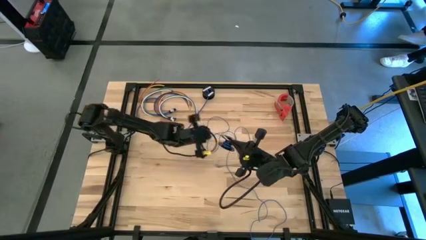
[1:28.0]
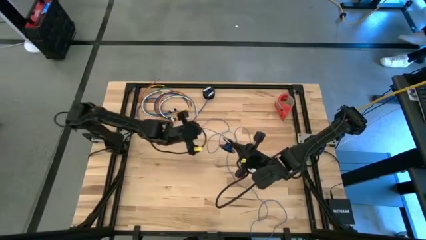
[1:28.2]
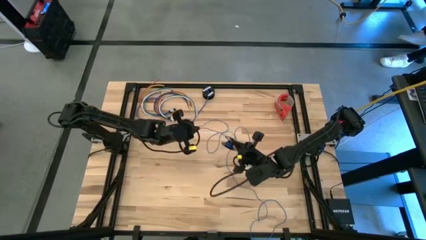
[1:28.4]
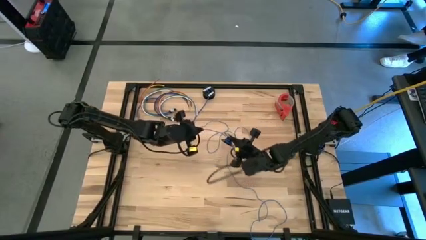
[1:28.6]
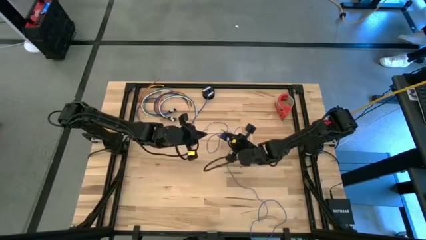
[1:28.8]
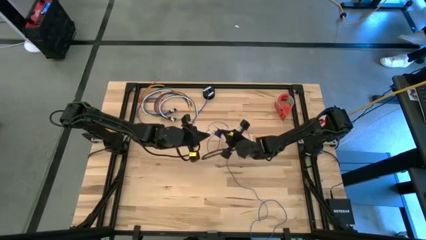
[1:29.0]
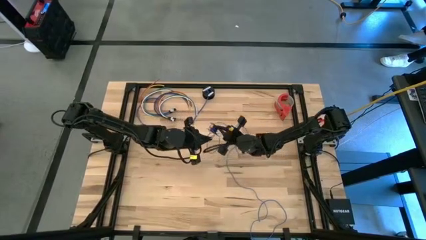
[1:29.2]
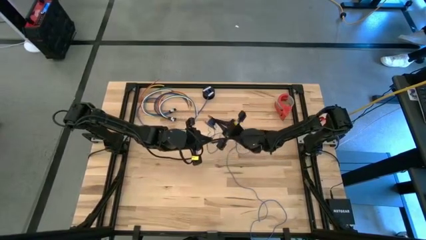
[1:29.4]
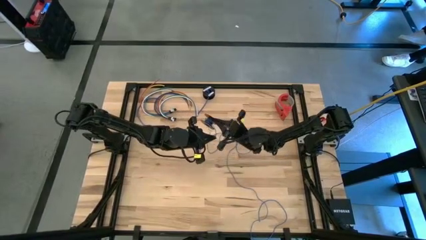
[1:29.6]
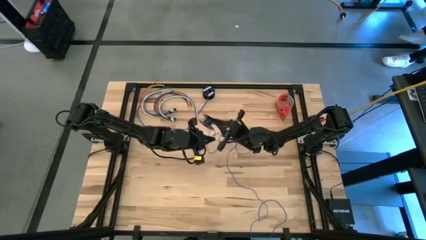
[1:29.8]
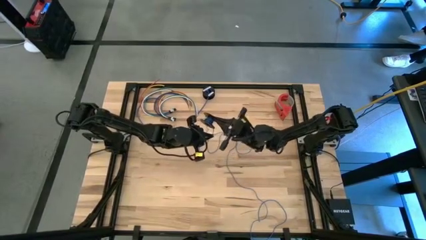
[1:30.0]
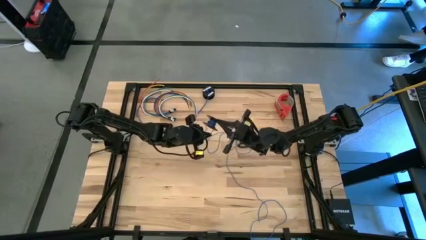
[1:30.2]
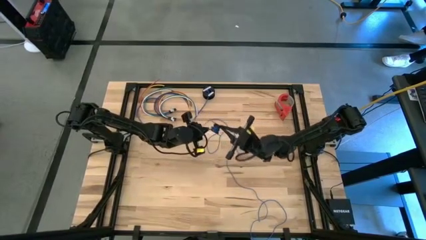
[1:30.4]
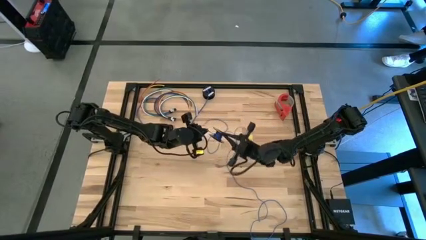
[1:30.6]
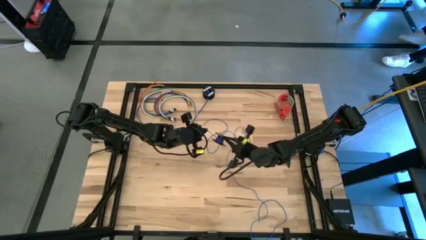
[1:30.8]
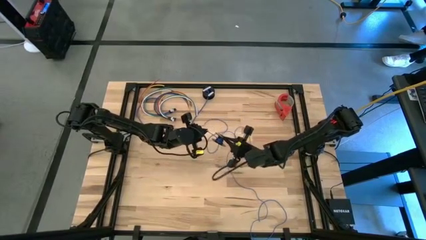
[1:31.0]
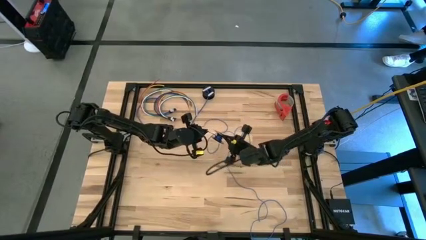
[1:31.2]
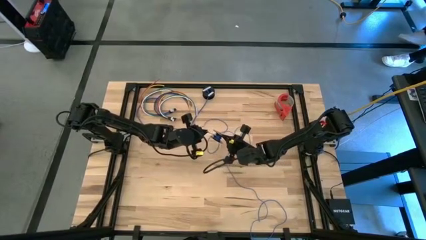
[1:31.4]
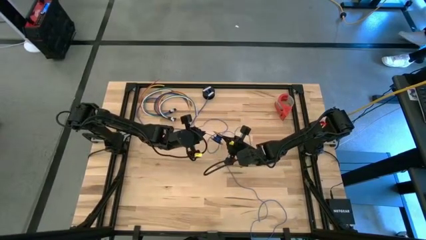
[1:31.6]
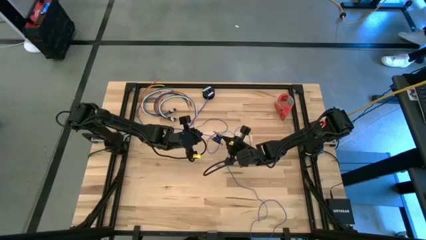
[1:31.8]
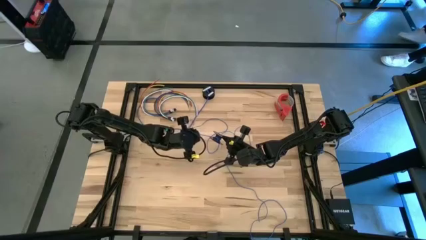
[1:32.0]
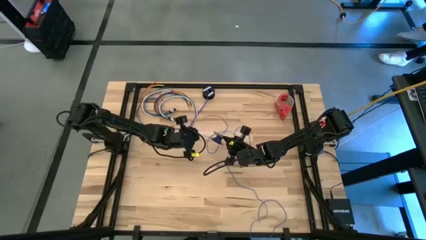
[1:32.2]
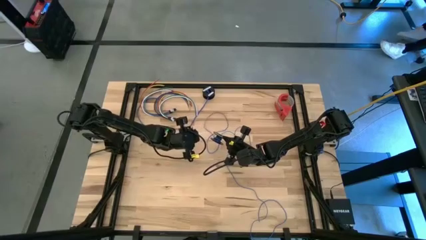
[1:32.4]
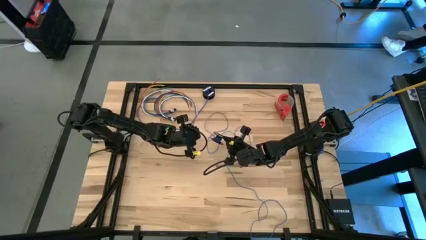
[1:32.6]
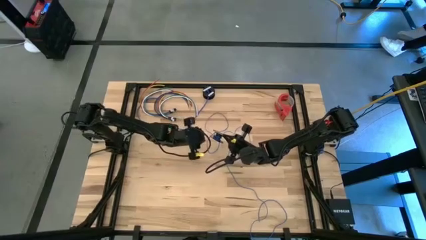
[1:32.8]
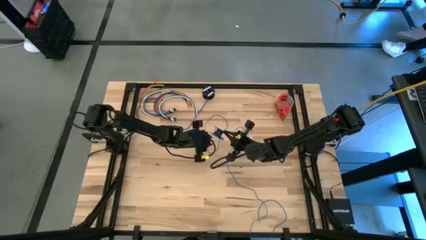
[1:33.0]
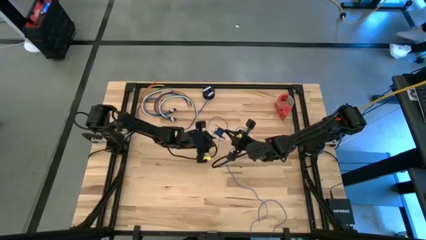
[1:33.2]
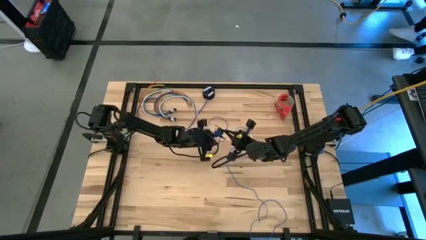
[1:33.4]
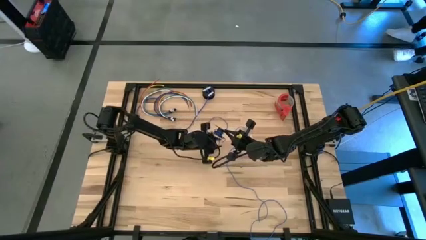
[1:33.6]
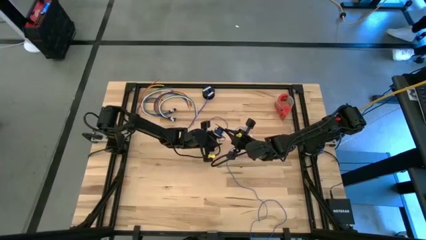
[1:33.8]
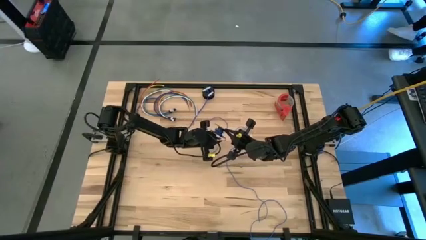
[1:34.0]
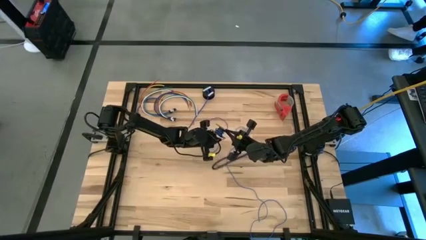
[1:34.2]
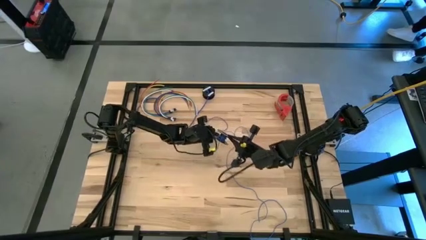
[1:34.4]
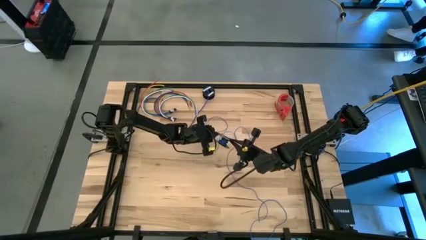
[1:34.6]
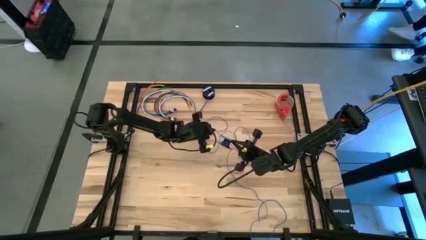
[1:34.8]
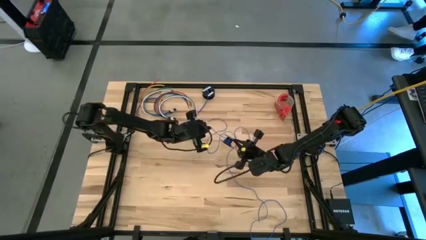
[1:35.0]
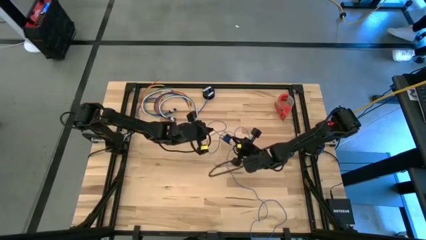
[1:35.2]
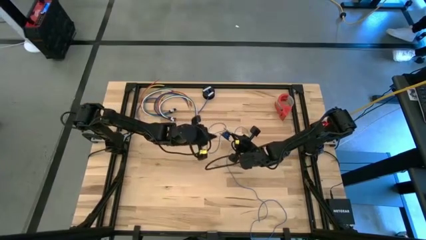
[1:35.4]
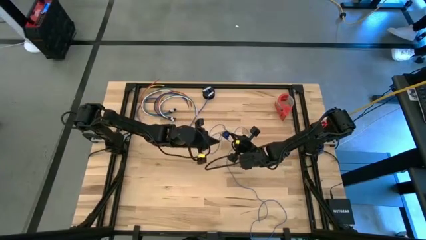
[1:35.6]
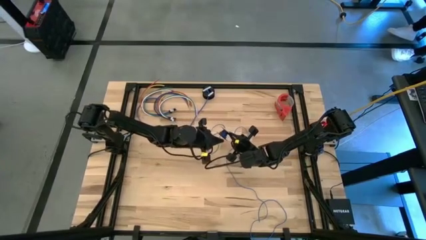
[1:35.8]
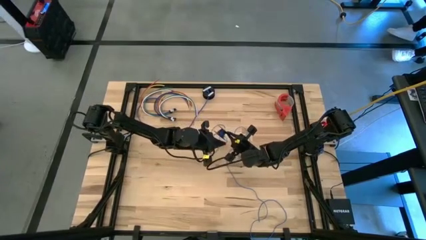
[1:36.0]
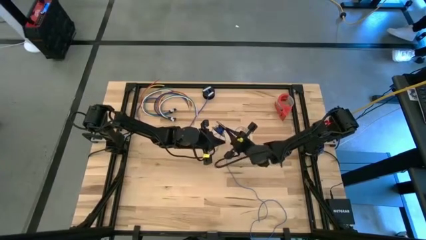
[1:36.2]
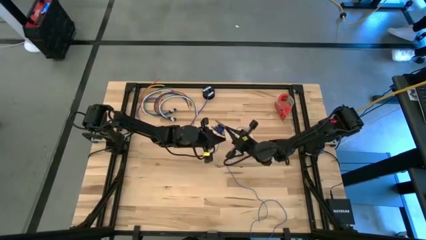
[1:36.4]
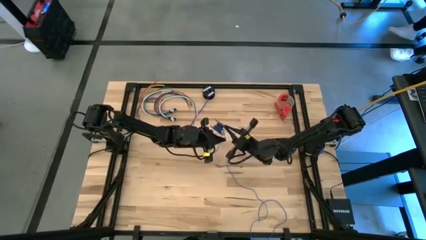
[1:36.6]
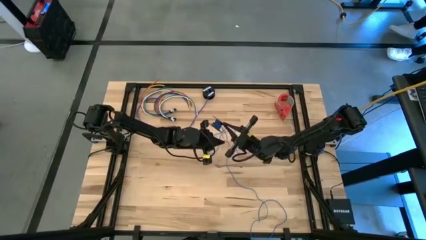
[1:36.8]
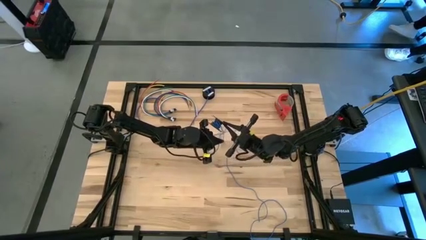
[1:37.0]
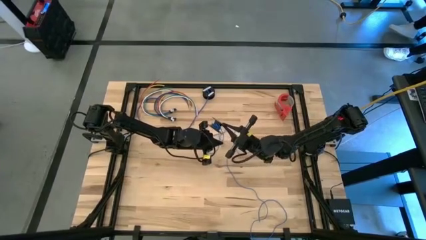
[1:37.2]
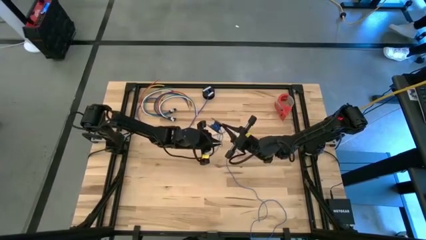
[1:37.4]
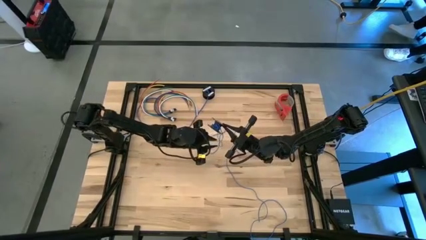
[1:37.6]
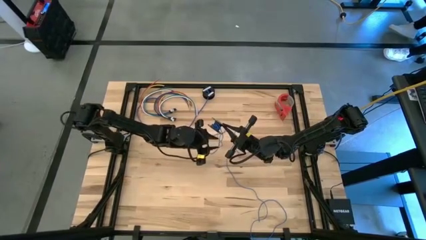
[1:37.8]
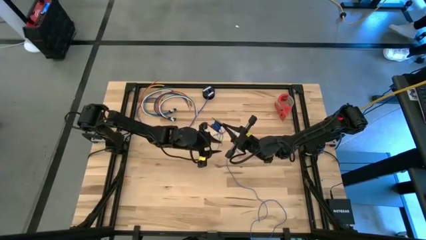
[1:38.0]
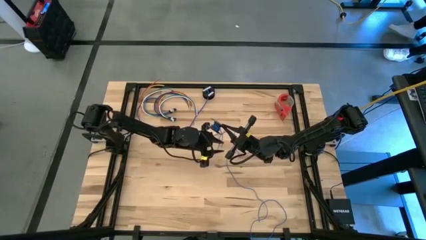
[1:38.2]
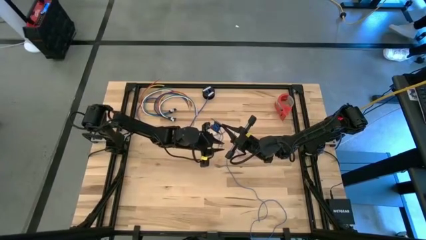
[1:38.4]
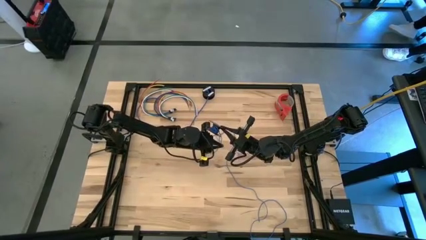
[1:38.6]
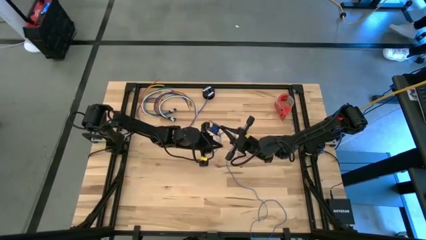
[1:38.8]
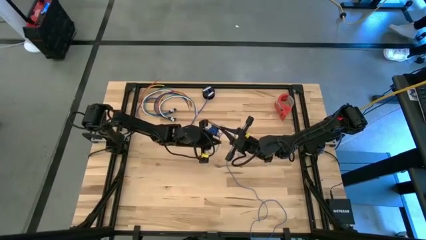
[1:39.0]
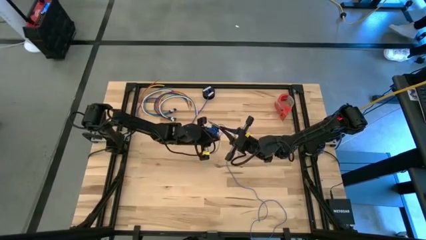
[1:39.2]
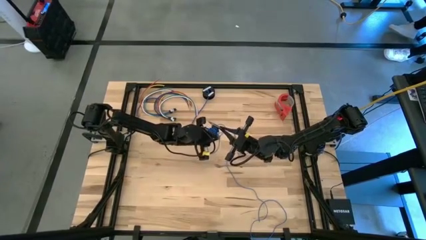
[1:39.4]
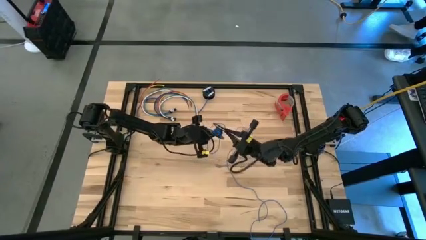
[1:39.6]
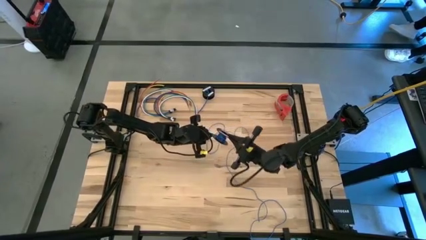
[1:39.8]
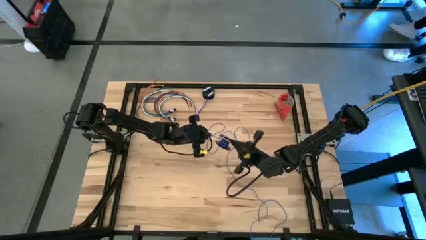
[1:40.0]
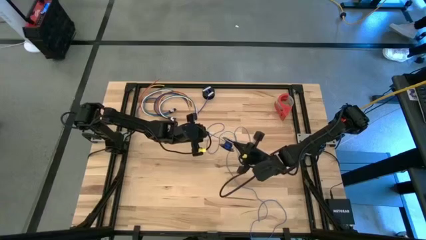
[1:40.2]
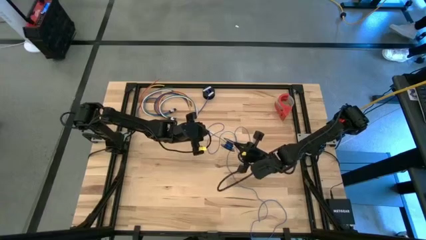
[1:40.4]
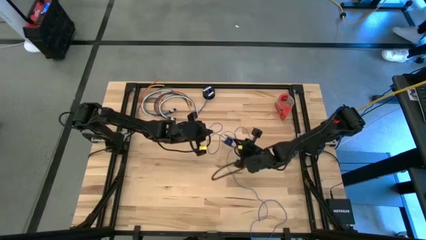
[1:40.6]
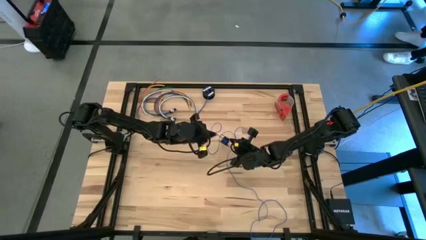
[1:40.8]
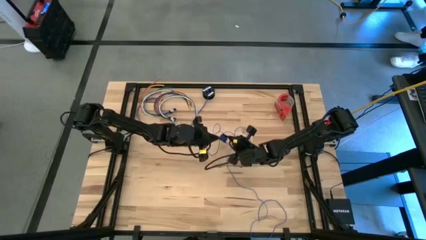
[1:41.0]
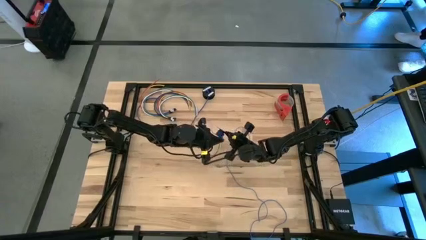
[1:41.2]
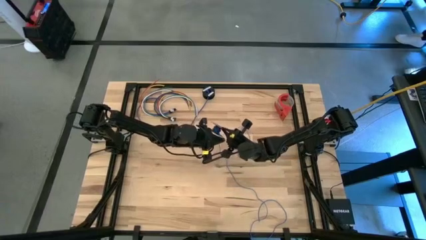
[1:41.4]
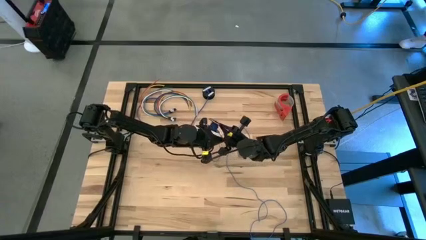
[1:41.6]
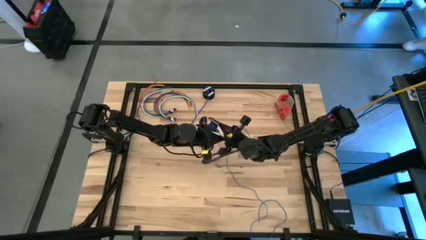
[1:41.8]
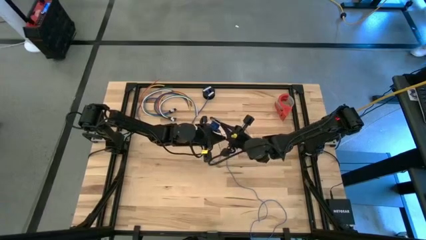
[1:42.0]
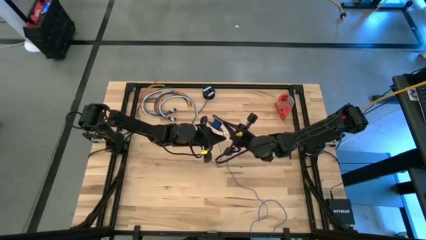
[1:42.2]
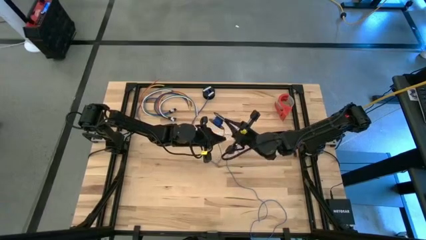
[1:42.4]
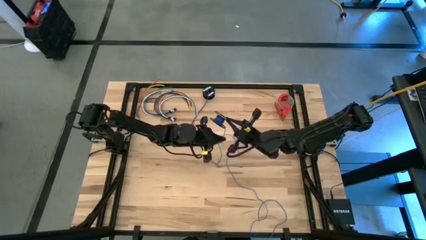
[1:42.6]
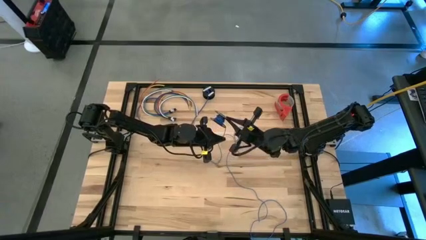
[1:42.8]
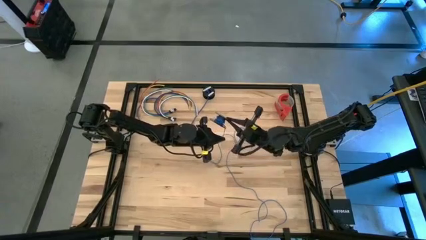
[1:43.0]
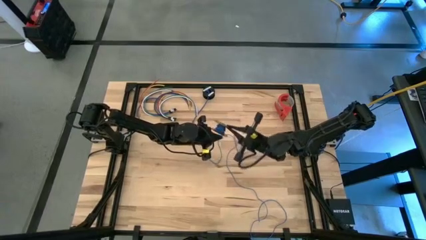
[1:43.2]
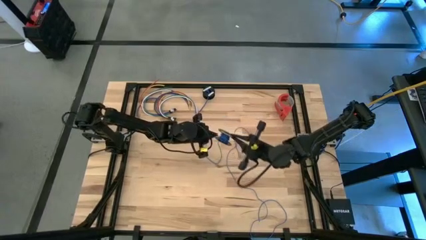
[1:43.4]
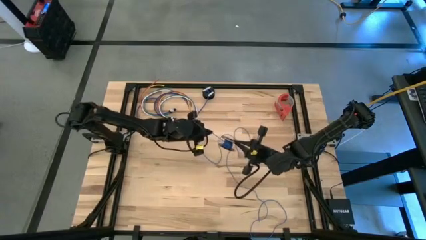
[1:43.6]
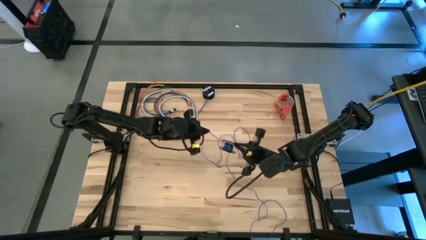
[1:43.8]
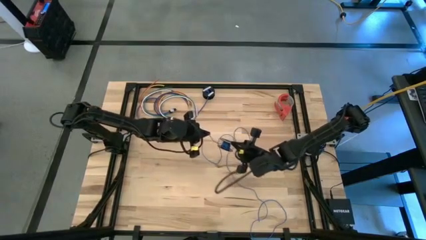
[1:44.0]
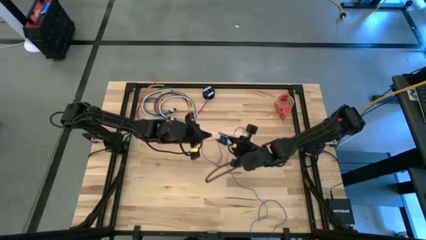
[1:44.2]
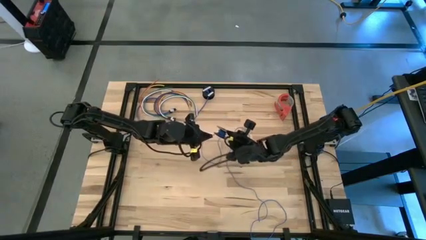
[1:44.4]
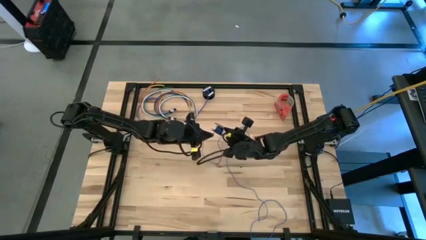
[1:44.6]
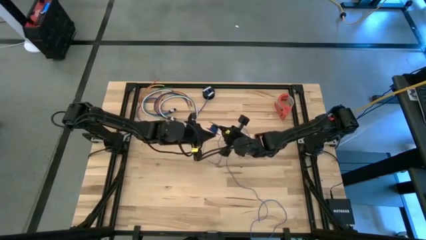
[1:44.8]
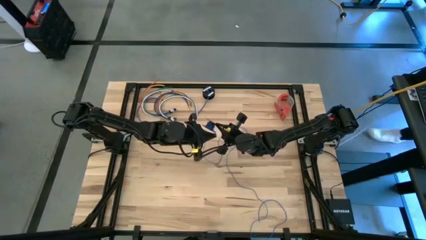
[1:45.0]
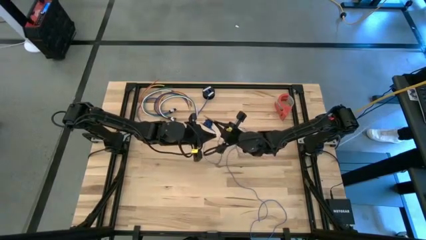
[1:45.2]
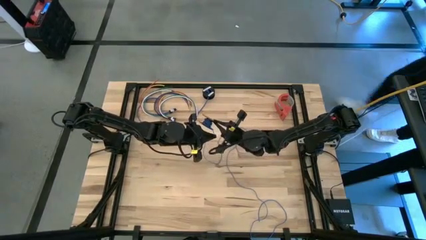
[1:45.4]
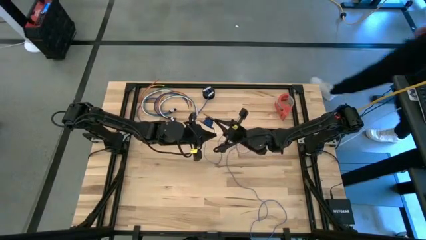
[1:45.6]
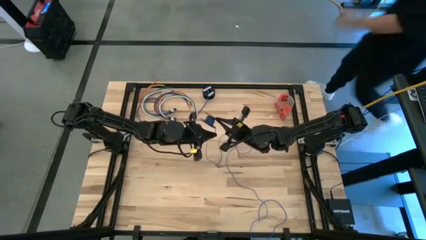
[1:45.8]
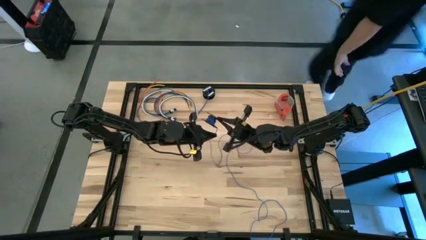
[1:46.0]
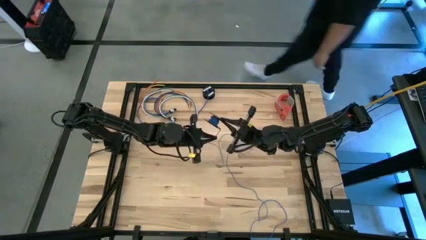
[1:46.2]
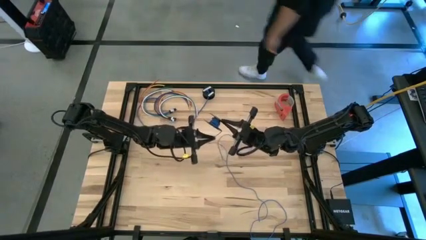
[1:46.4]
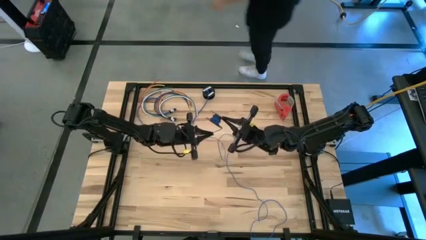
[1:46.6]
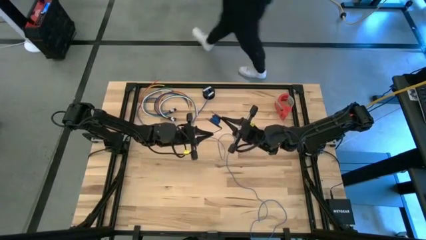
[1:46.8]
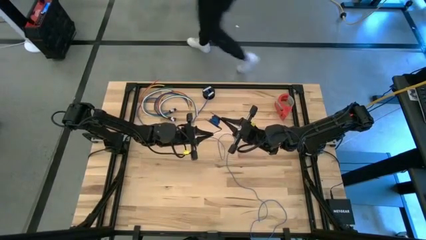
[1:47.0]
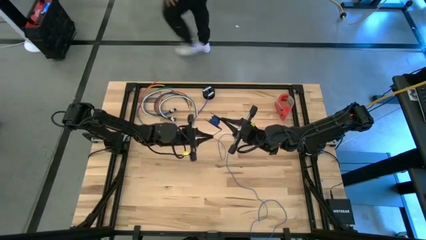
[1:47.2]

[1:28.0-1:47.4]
Task: Coil cords
Coil the blue wire onto the black spool
